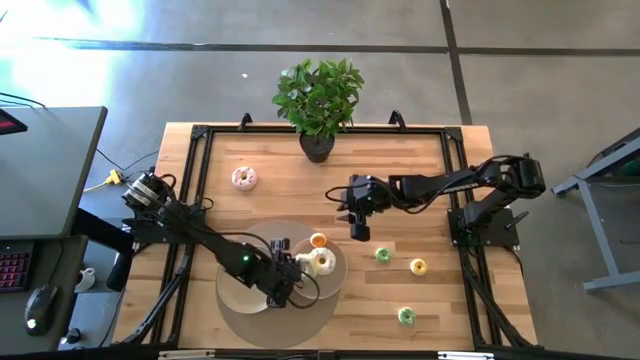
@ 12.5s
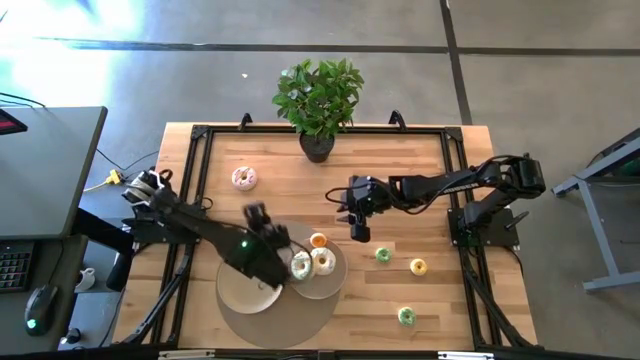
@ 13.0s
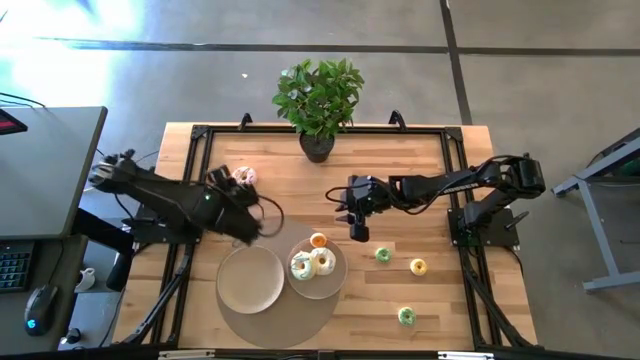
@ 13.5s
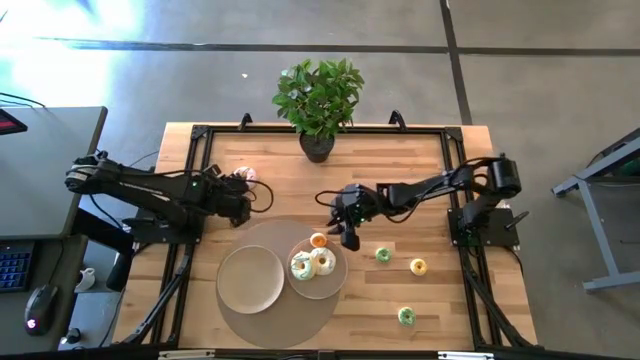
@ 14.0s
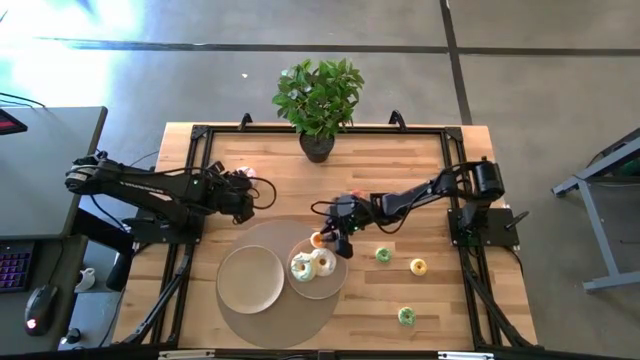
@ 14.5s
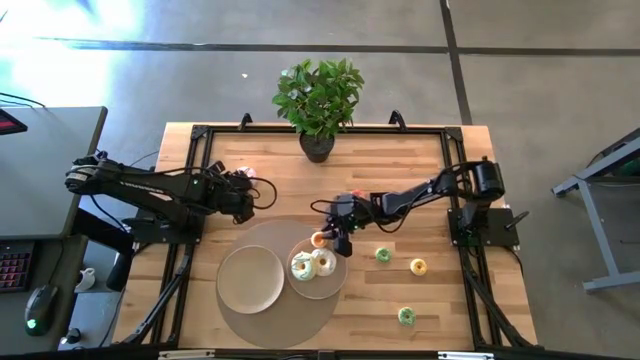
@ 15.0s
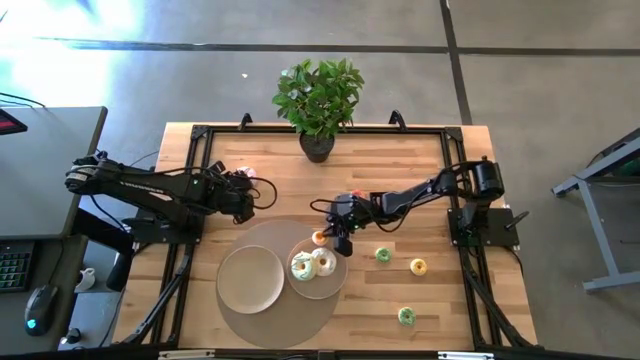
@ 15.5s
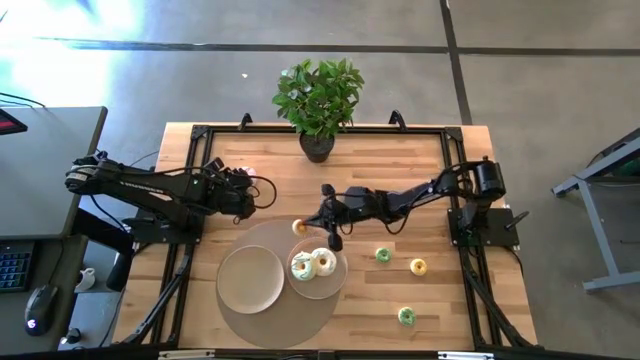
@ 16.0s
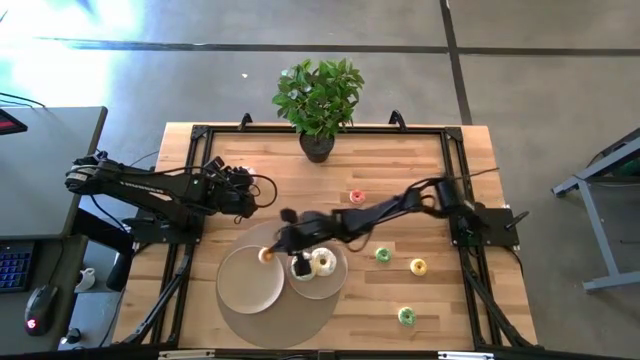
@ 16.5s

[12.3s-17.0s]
Task: Pick & Place donuts
Put the left small pink donut on the left white plate

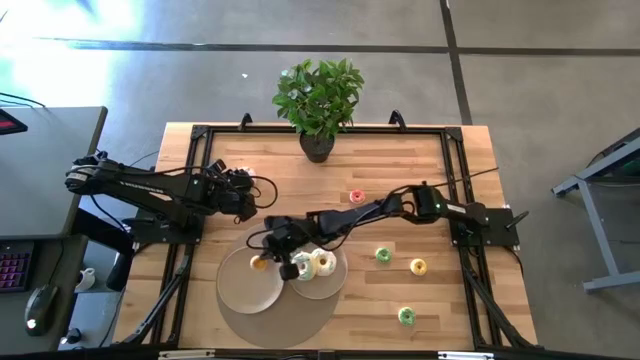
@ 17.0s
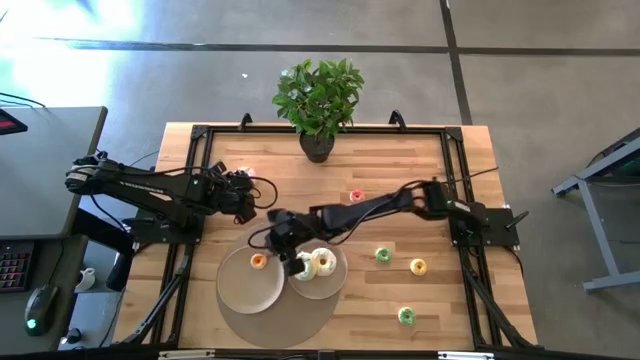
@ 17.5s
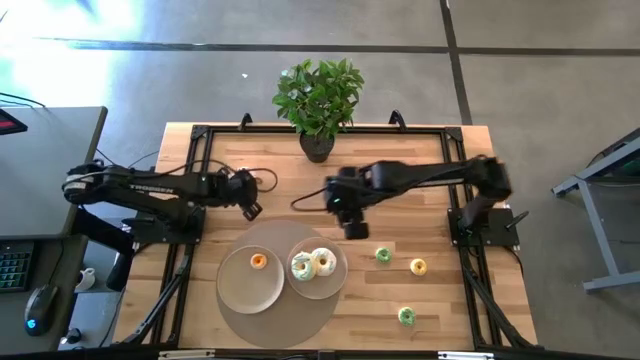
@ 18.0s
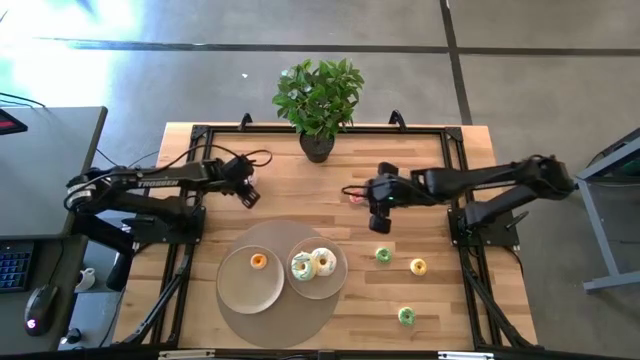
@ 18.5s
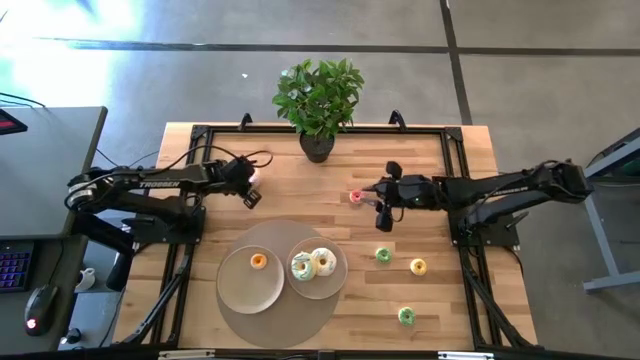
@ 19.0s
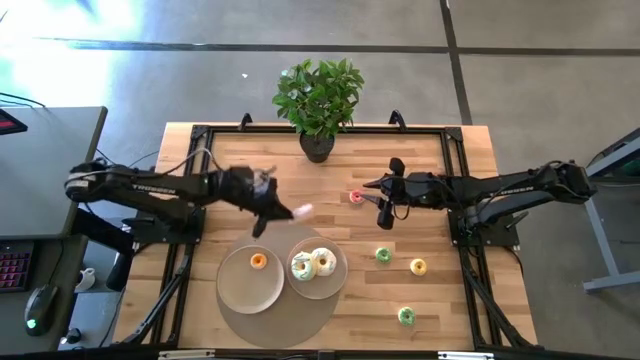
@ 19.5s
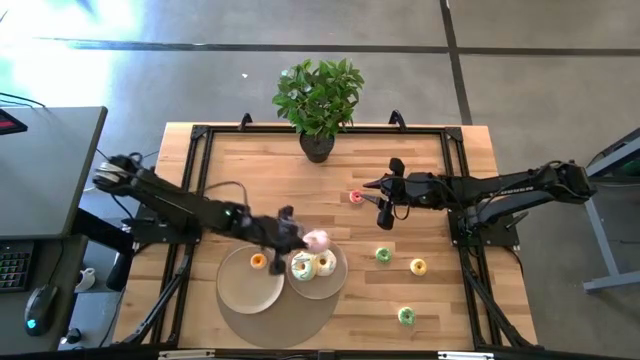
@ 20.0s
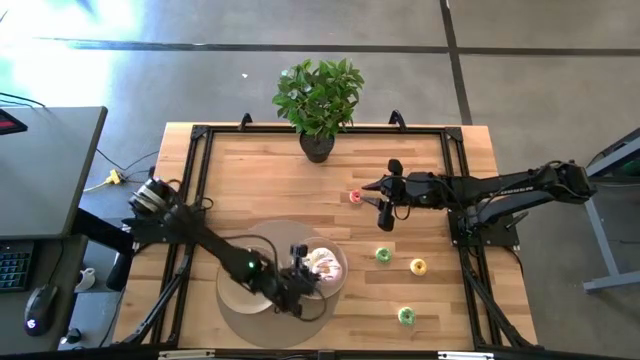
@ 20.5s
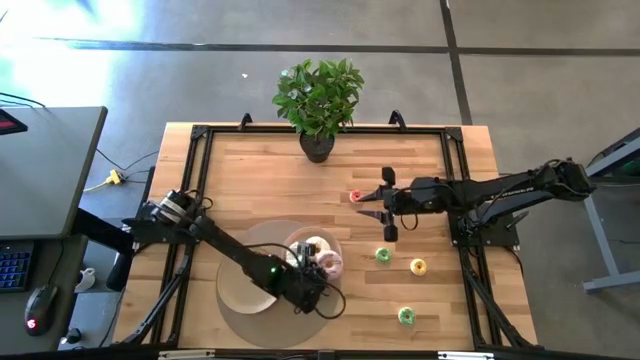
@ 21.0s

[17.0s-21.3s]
Put the large violet donut on the right white plate

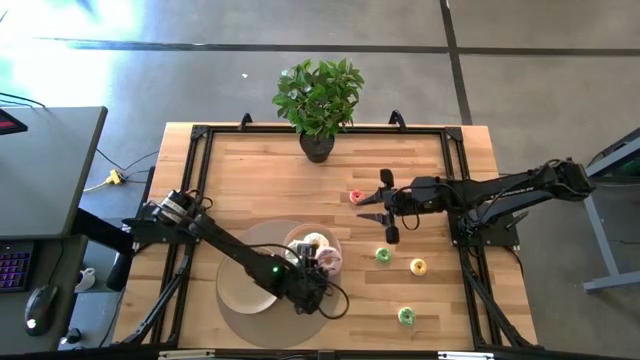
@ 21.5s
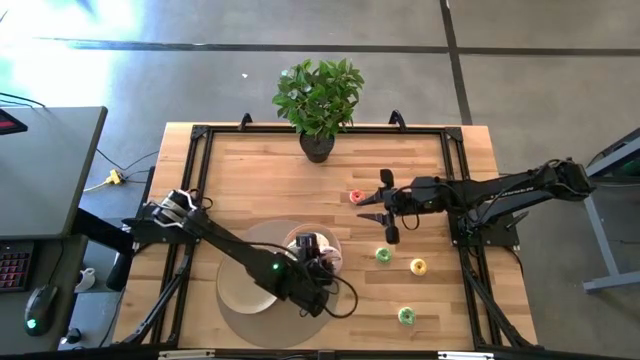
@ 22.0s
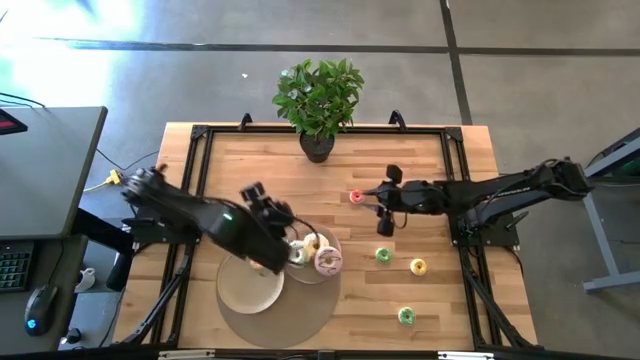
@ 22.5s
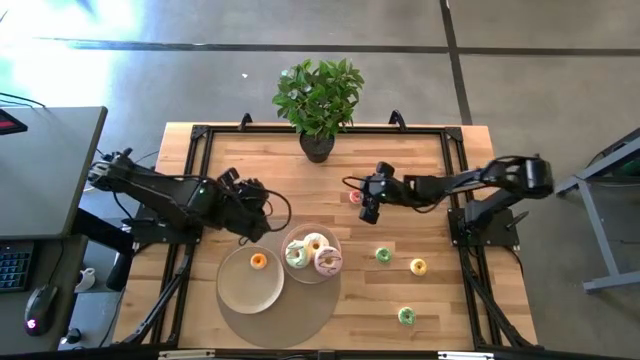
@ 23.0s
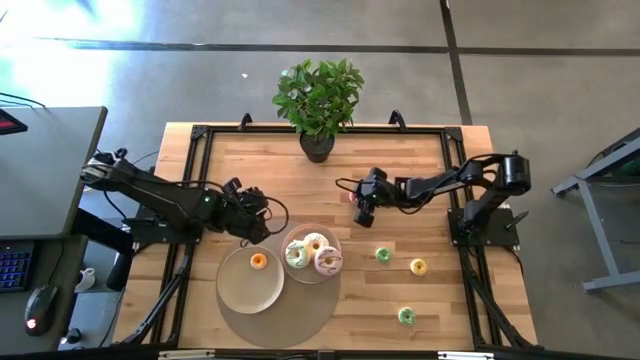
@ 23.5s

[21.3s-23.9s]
Put the small pink donut on the left white plate

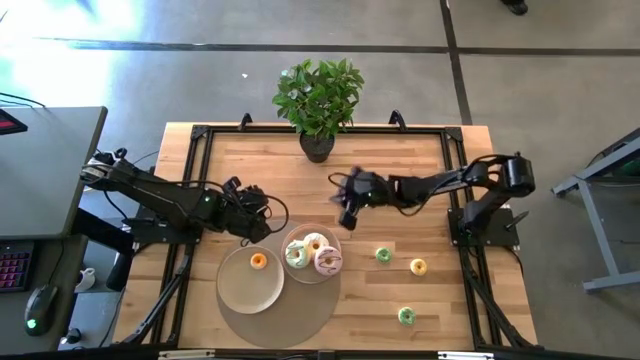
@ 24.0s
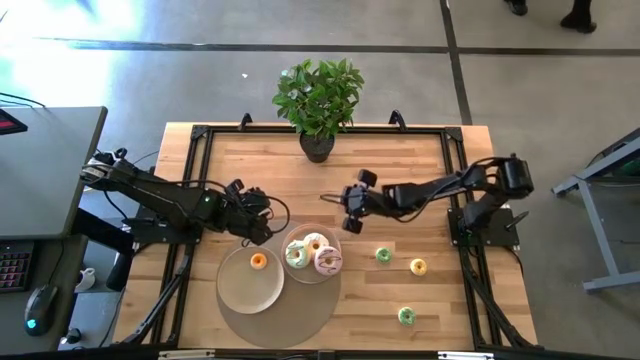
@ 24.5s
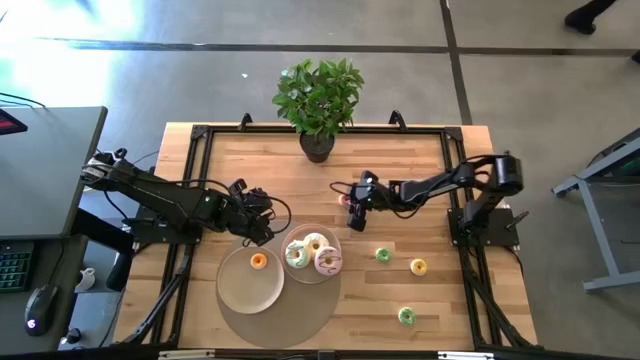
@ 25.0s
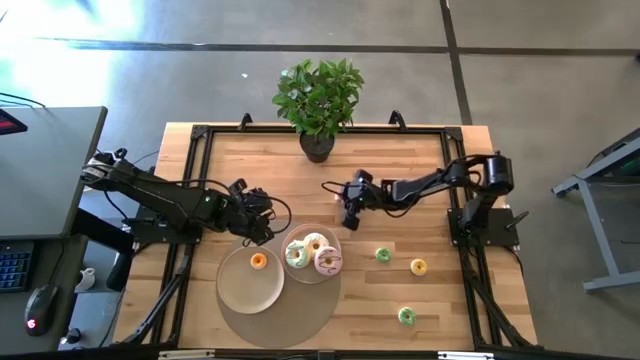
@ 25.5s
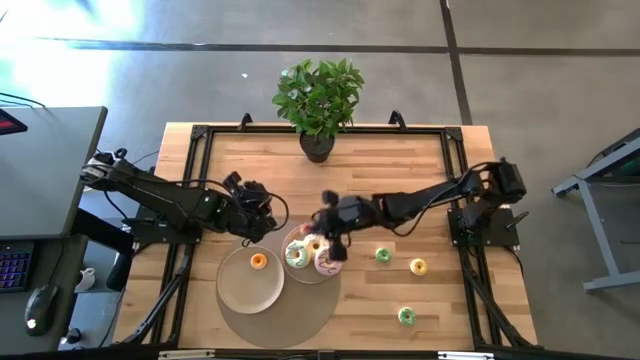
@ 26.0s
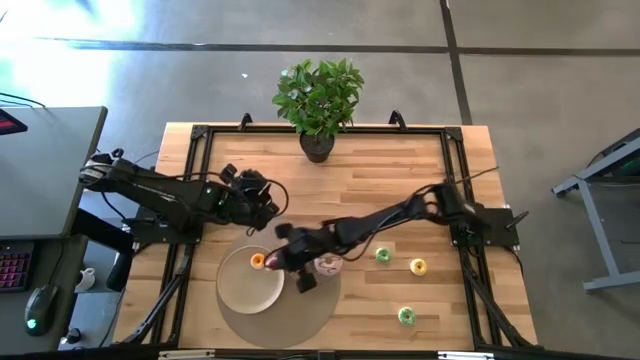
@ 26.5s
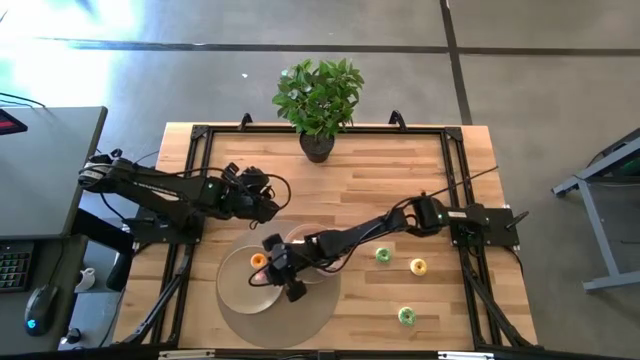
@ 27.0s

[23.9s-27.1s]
Put the small pink donut on the left white plate

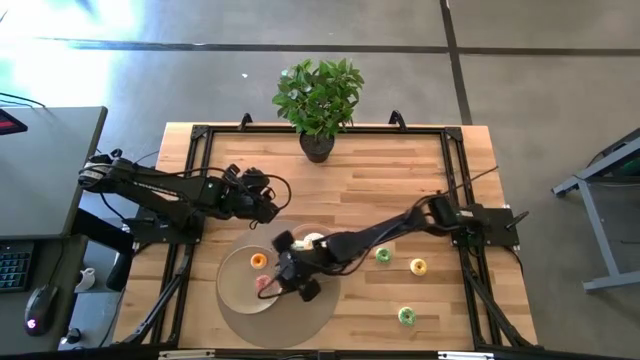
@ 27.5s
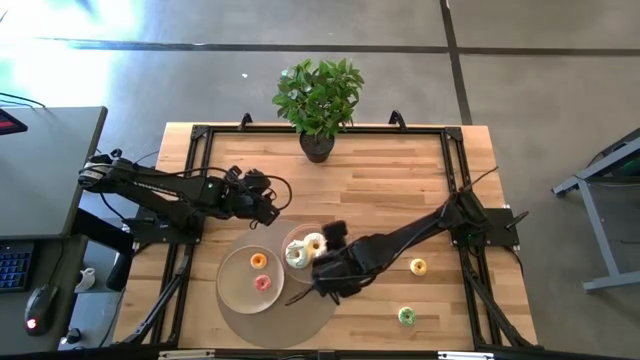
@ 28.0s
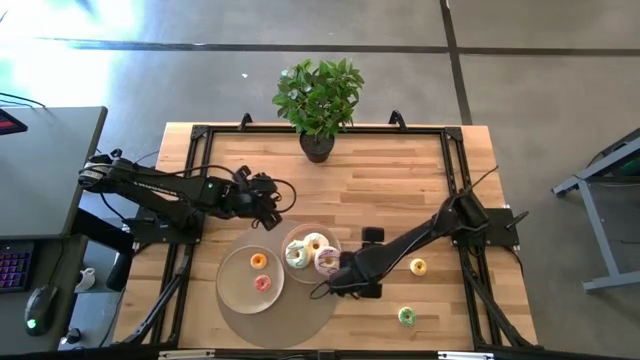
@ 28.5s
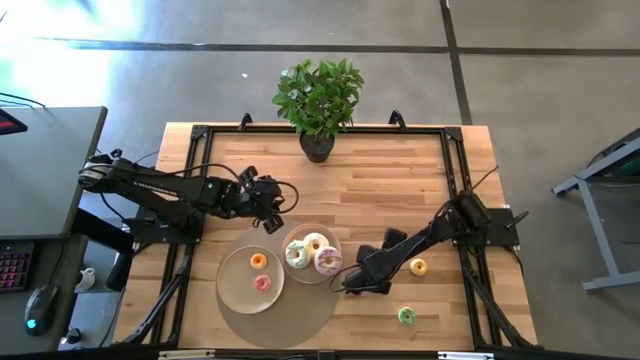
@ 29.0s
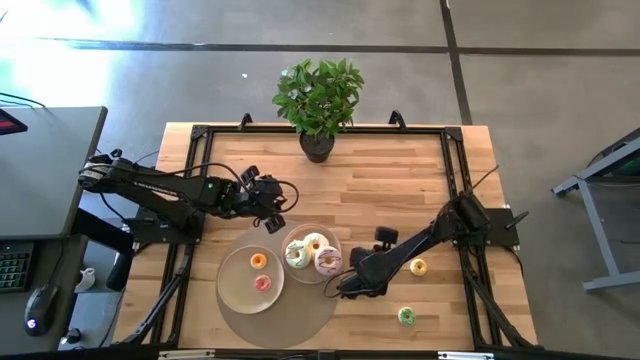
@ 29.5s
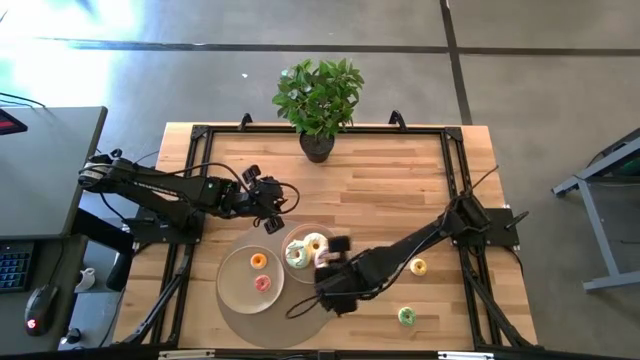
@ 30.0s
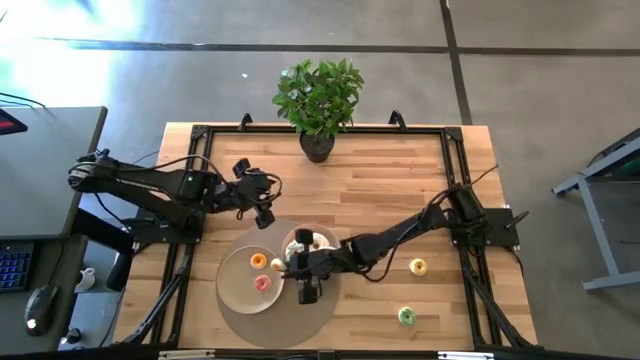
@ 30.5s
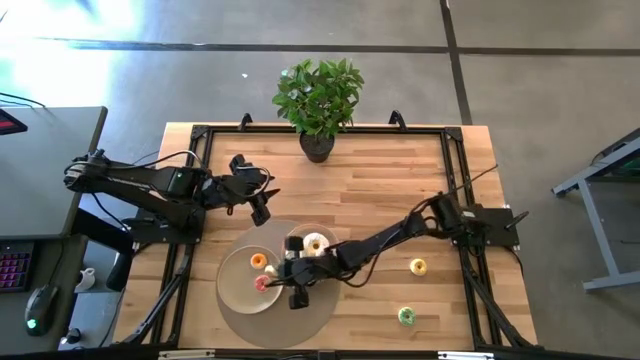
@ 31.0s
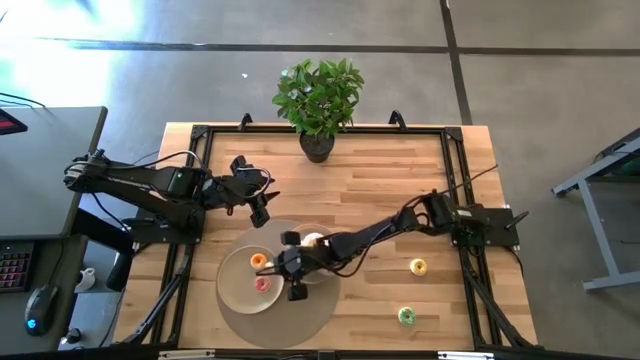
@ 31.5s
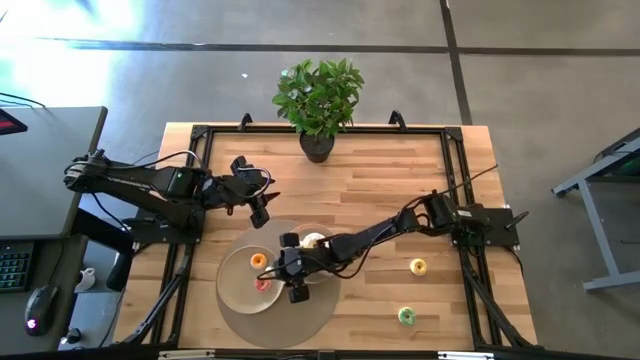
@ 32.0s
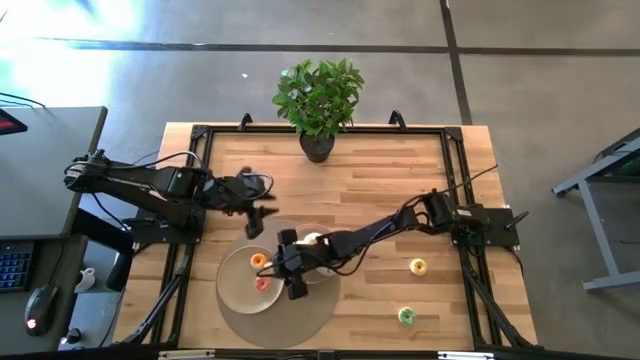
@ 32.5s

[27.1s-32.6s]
Put the top small green donut on the left white plate
